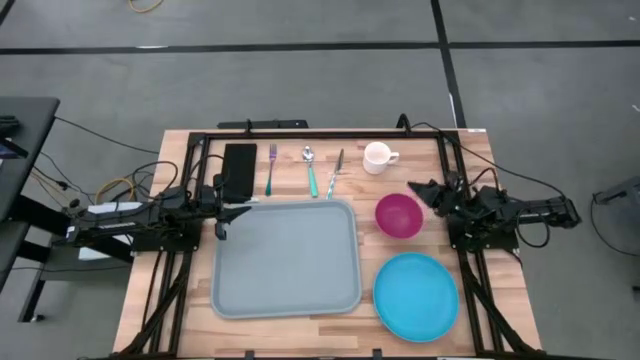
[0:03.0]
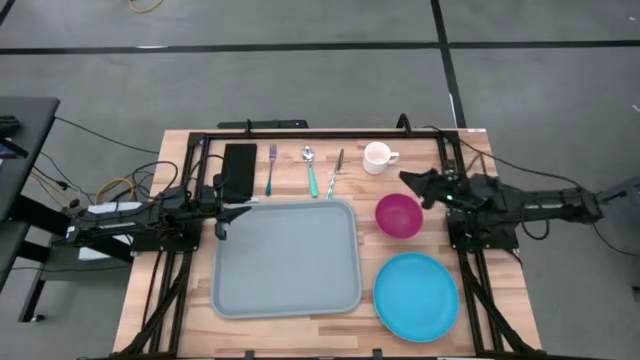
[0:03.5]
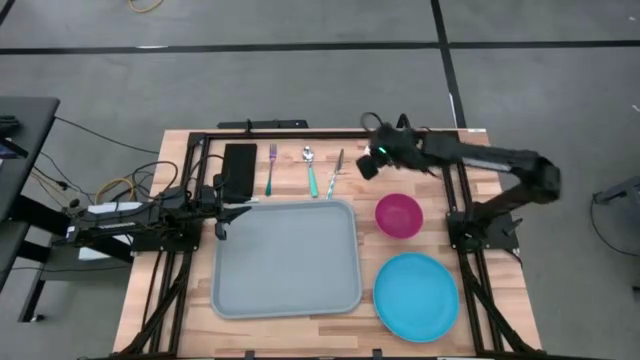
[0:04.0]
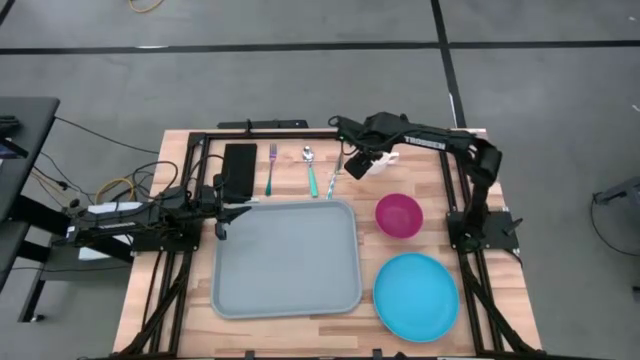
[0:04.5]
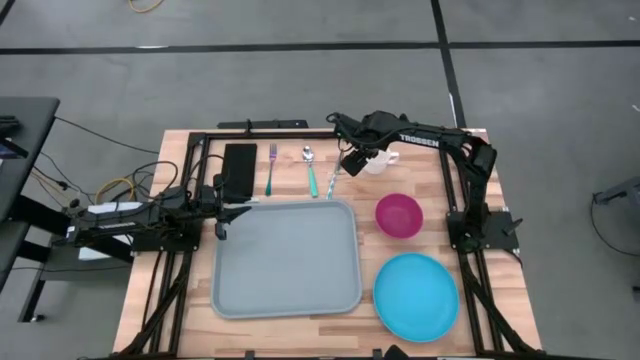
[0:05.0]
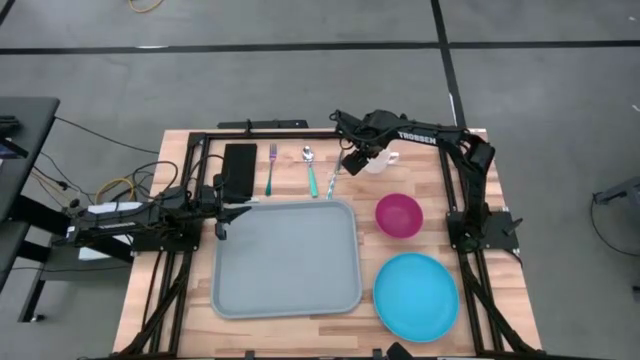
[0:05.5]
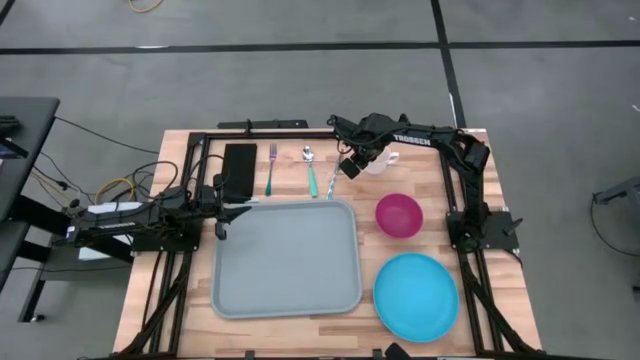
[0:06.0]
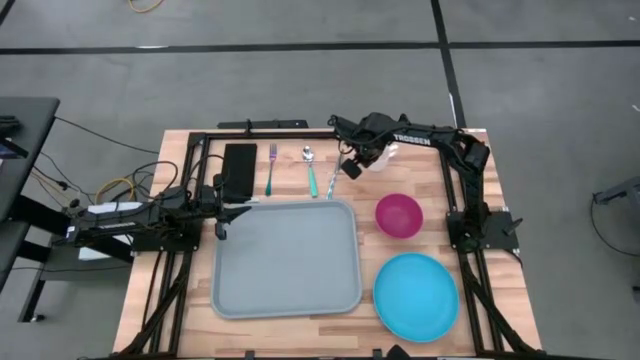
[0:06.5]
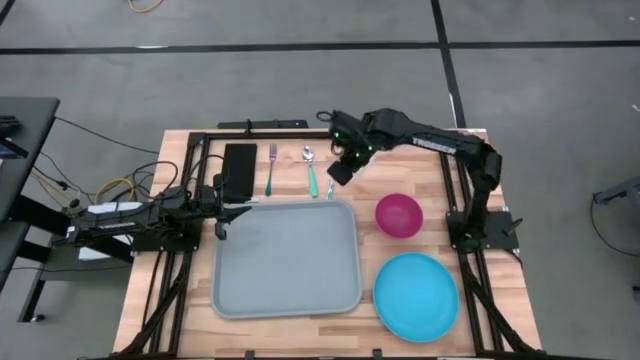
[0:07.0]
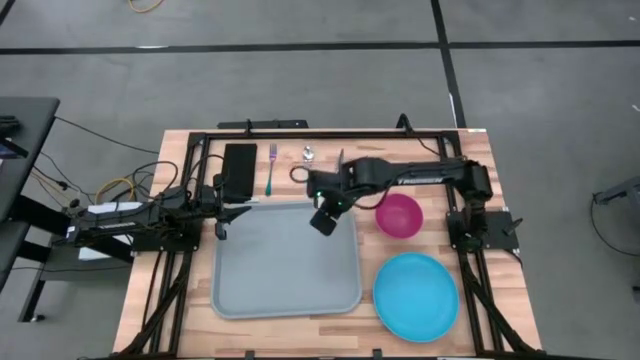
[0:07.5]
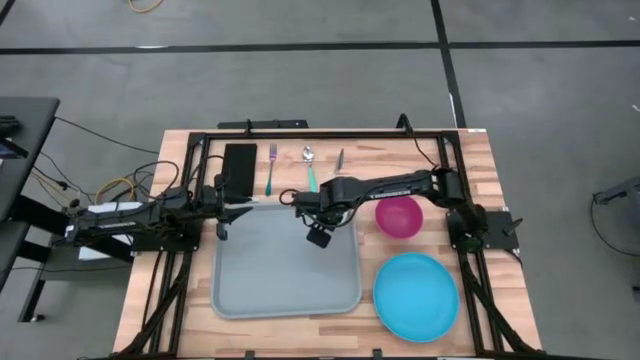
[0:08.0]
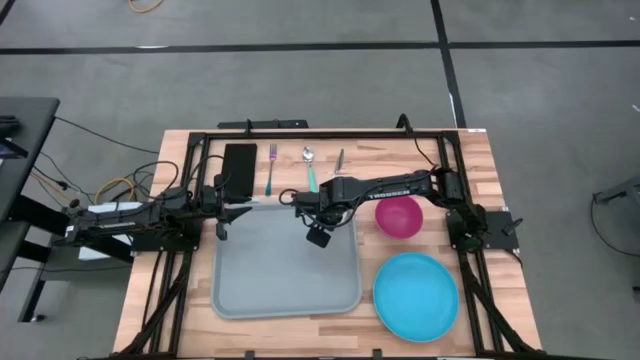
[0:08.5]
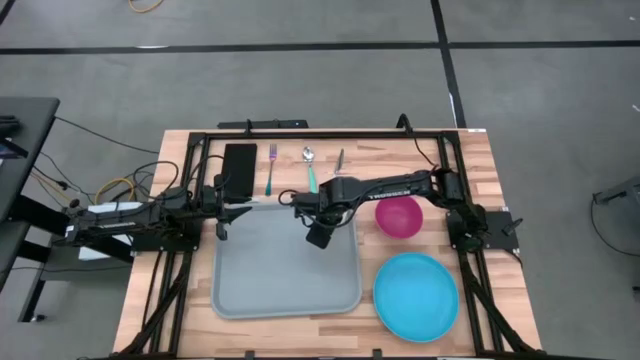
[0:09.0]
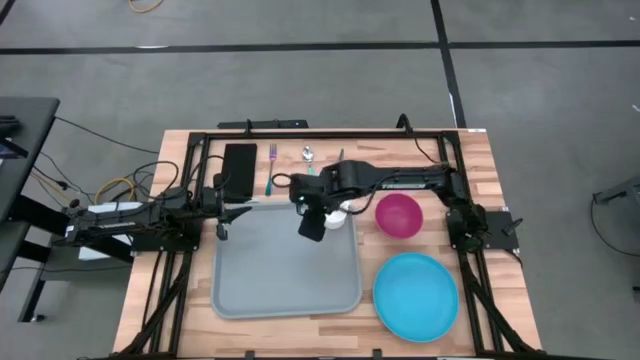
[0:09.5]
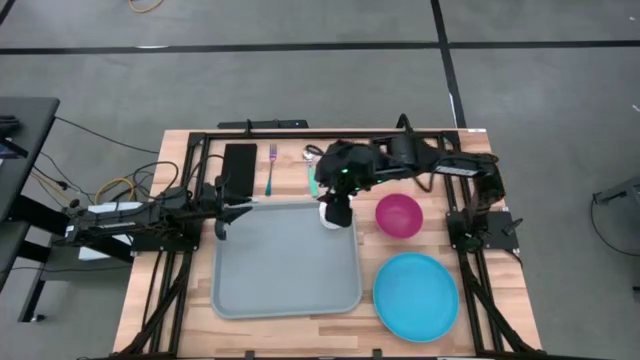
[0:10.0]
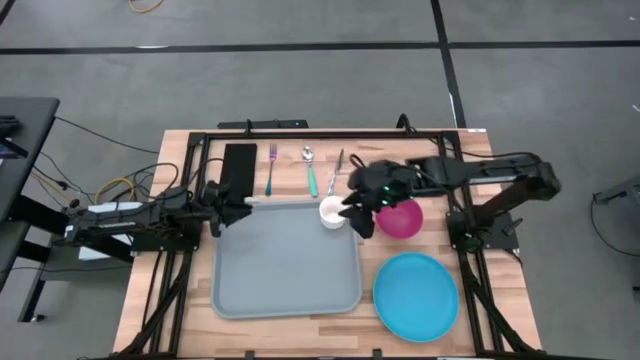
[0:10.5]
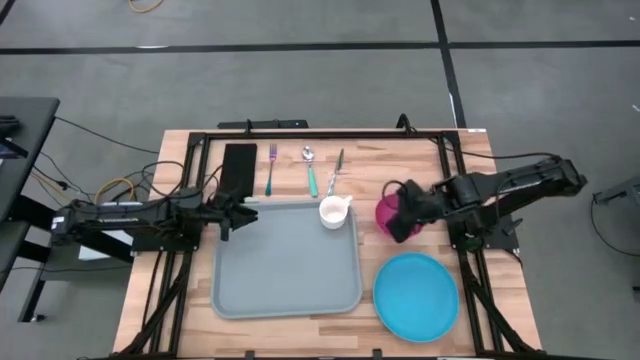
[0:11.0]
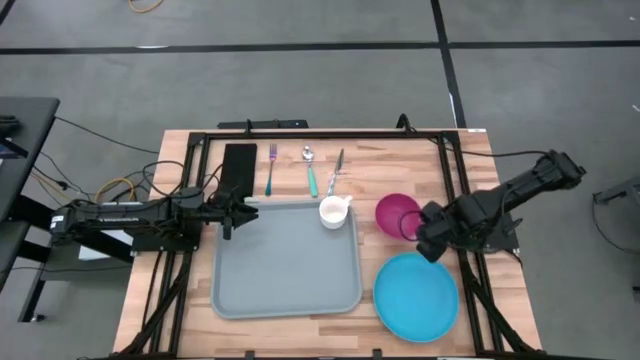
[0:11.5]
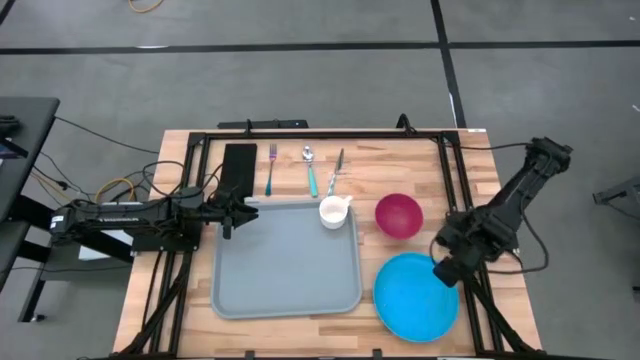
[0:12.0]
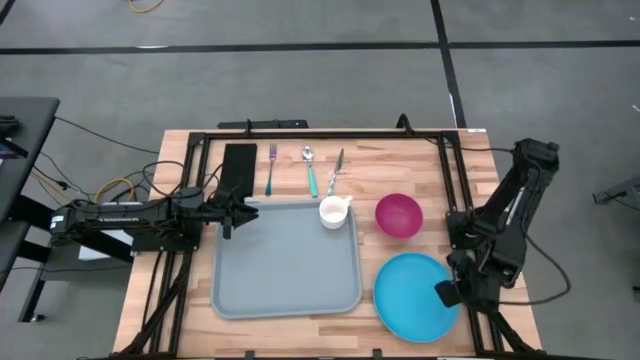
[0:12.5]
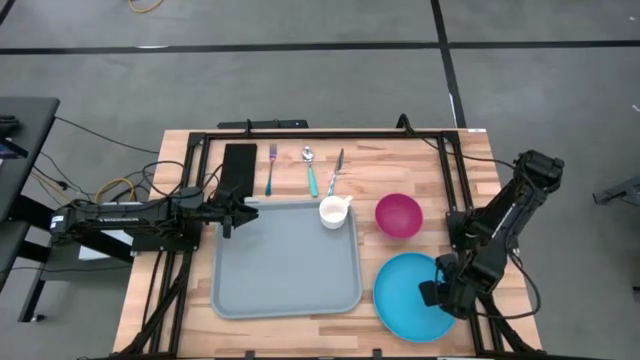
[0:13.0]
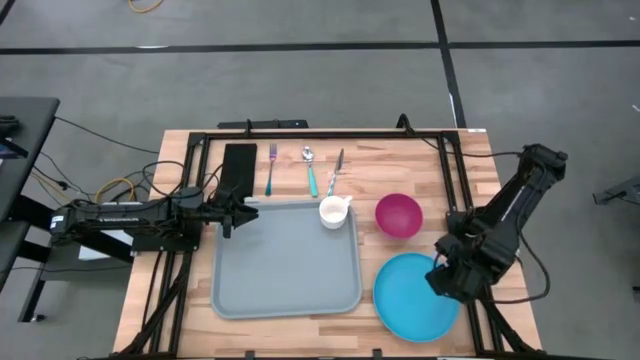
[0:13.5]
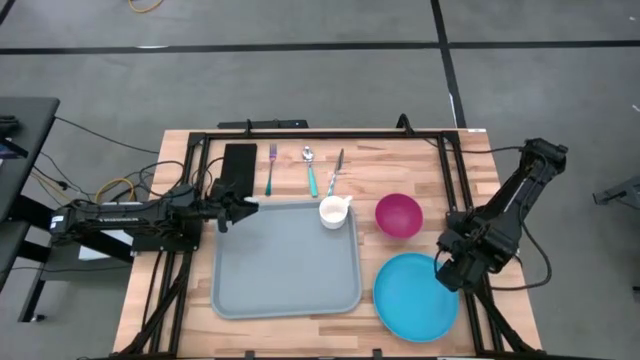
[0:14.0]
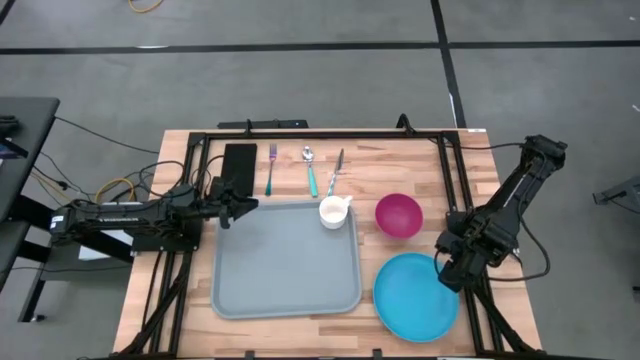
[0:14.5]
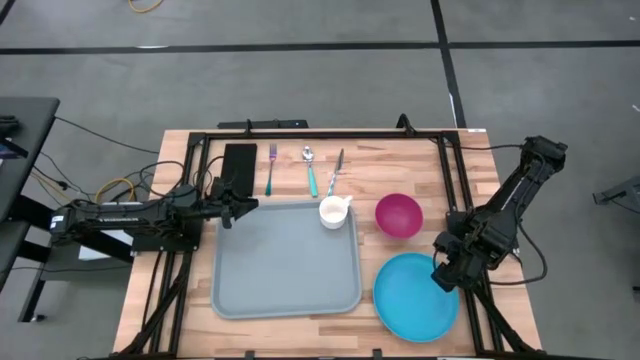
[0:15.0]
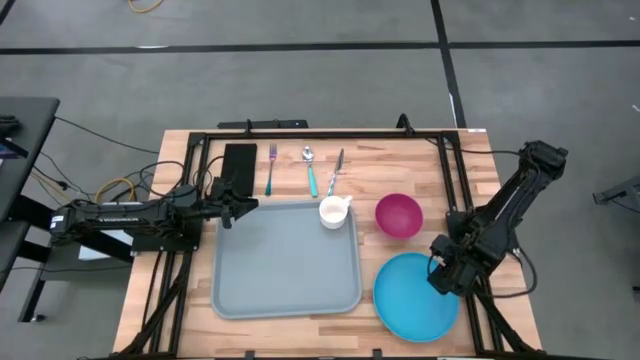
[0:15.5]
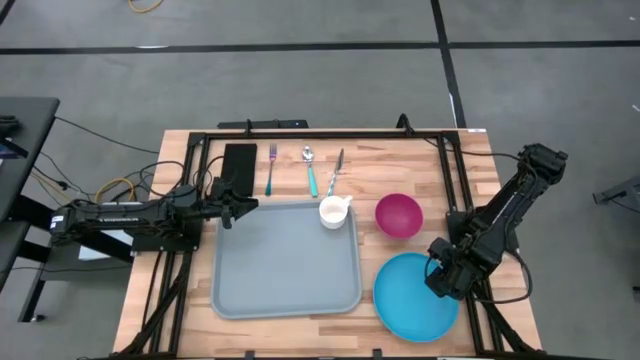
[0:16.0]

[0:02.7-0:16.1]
Task: Set up tray
Put the white mug on the gray serving tray

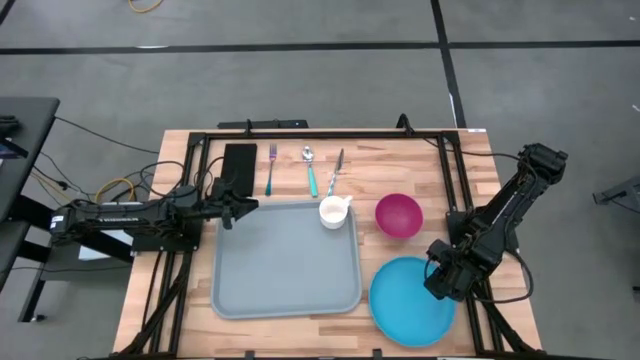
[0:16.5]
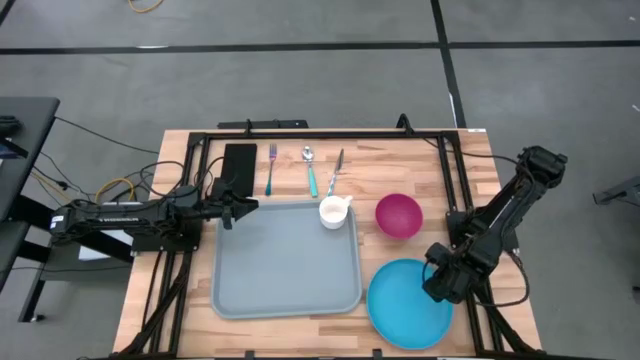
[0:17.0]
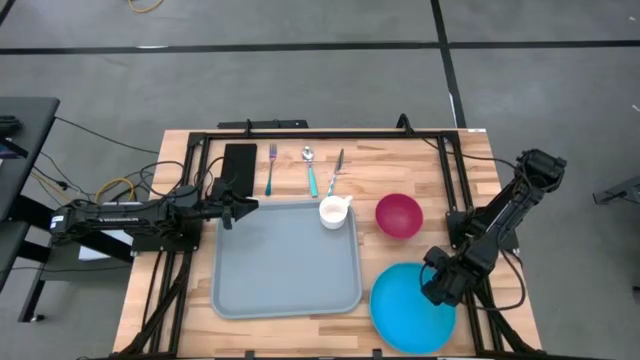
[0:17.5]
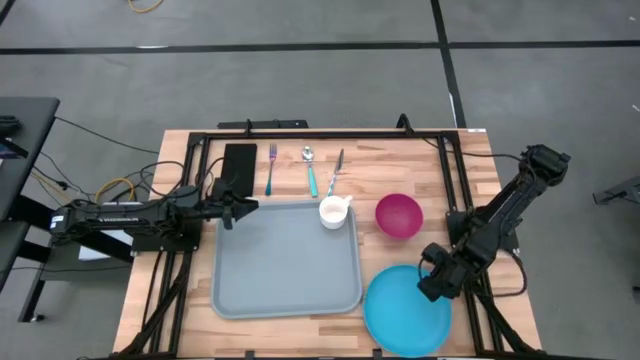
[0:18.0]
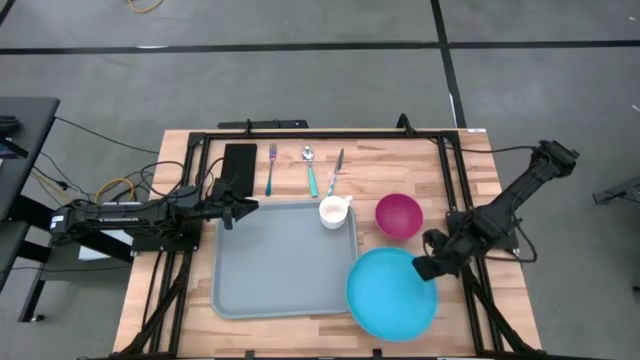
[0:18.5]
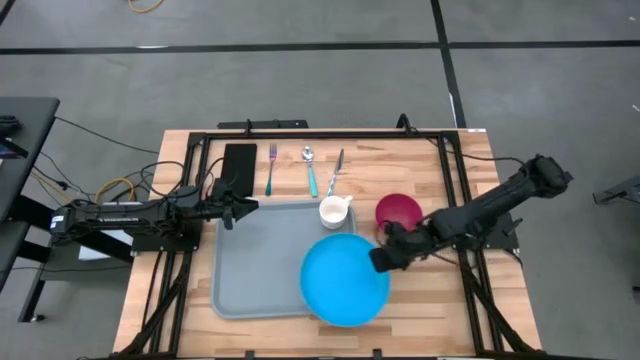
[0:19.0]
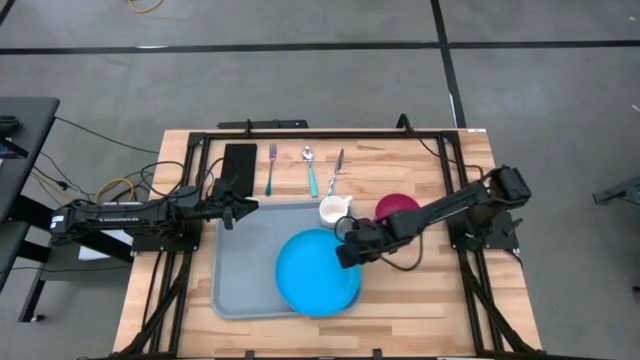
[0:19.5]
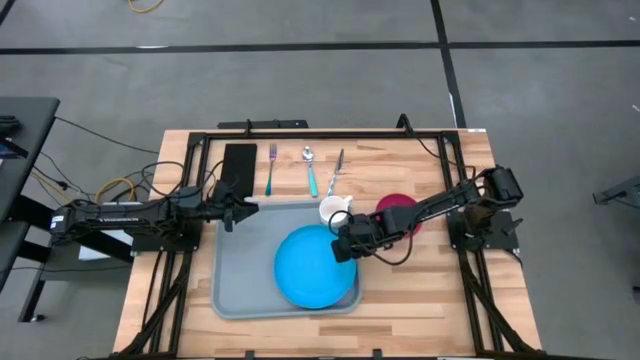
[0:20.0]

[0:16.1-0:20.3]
Put the blue plate on the gray serving tray below the white mug

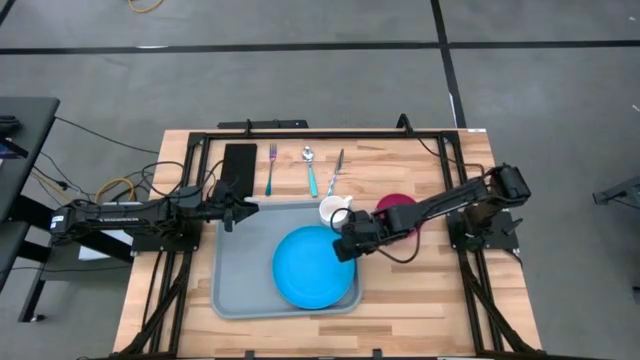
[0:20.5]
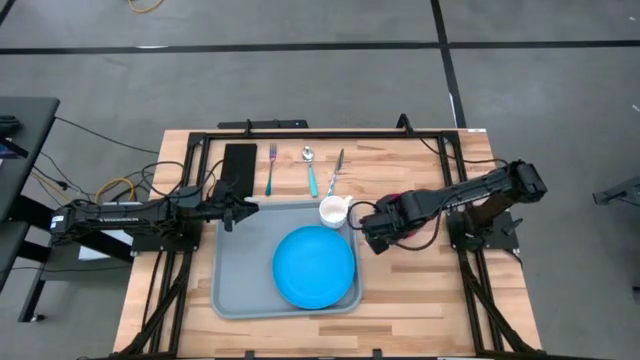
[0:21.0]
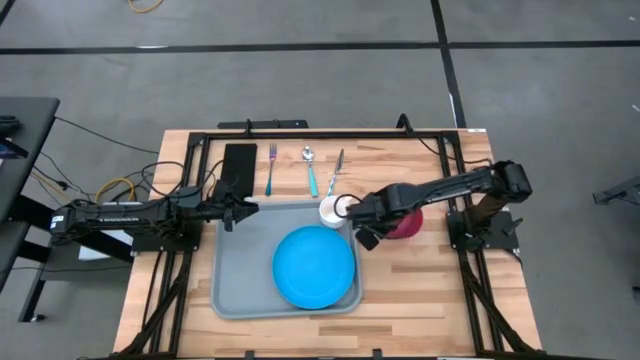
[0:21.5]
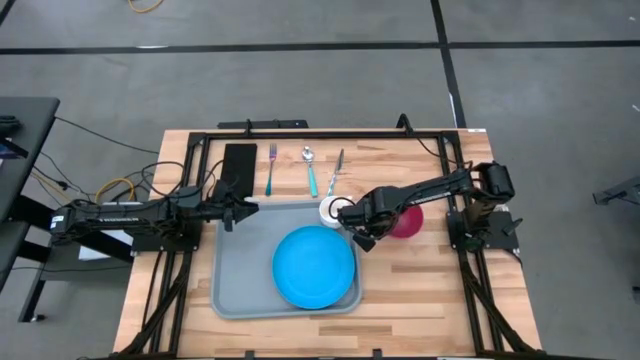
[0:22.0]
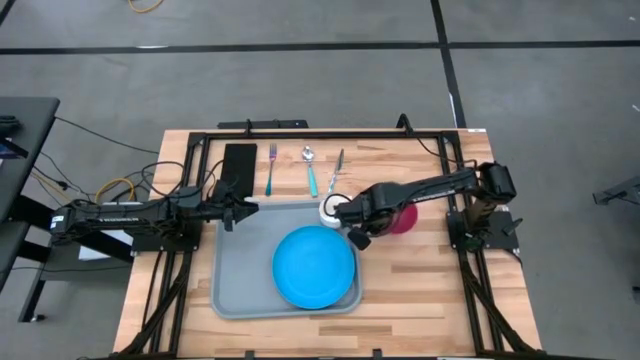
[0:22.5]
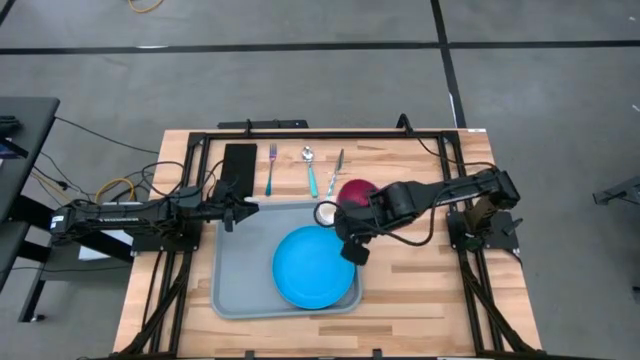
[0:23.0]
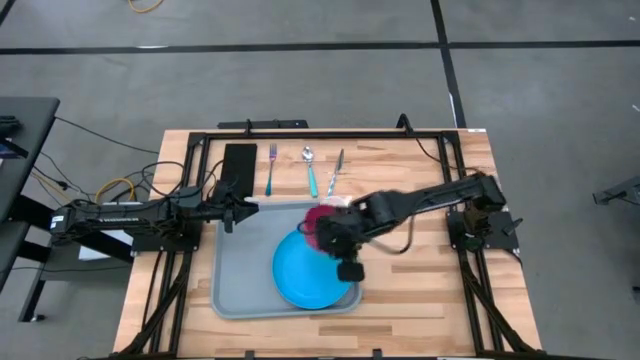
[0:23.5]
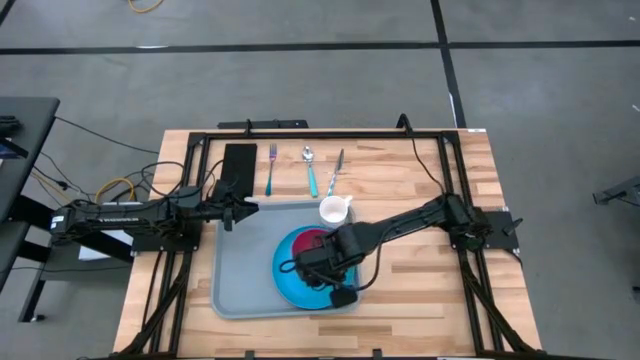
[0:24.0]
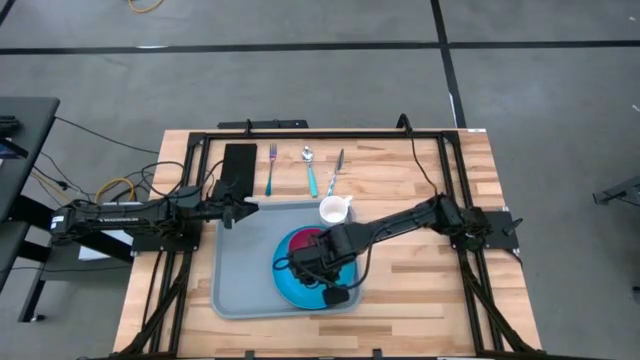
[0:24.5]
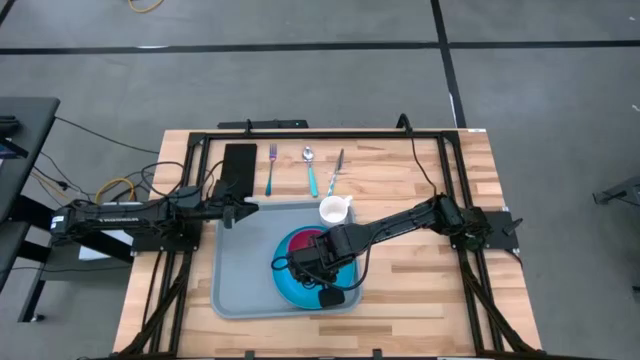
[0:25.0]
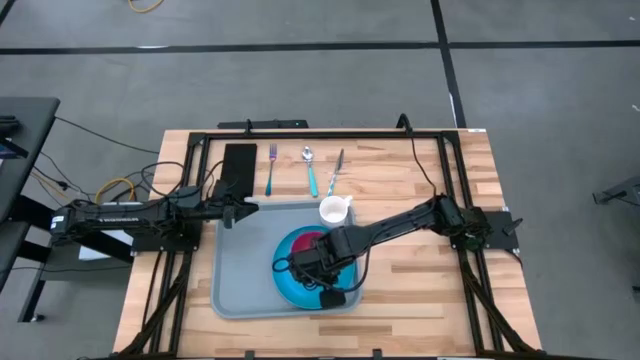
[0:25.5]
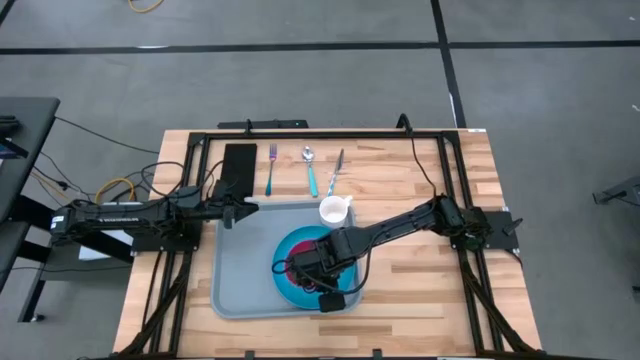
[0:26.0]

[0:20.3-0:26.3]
Put the red bowl on the blue plate on the gray serving tray
